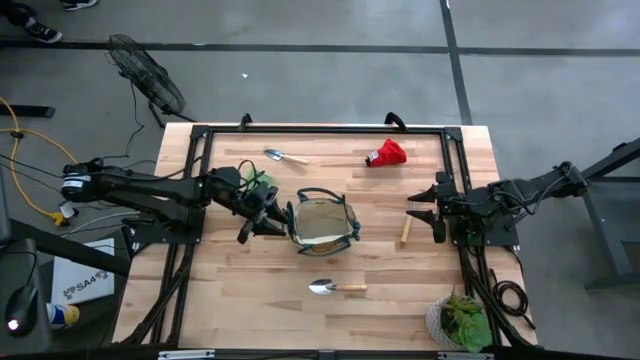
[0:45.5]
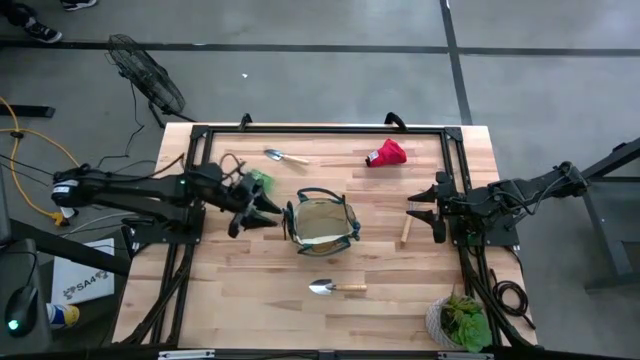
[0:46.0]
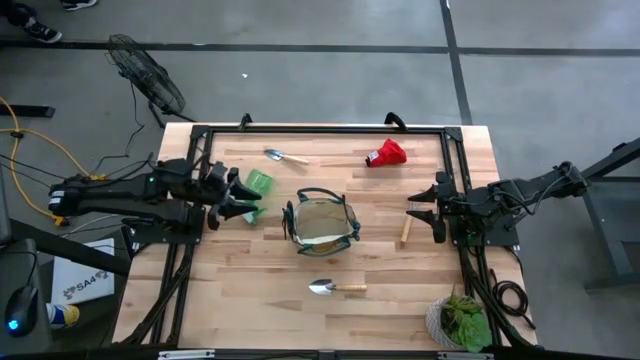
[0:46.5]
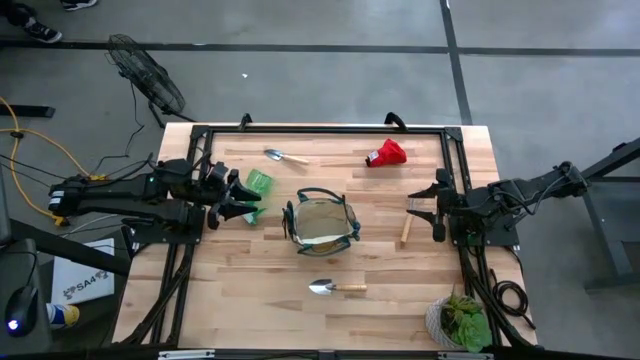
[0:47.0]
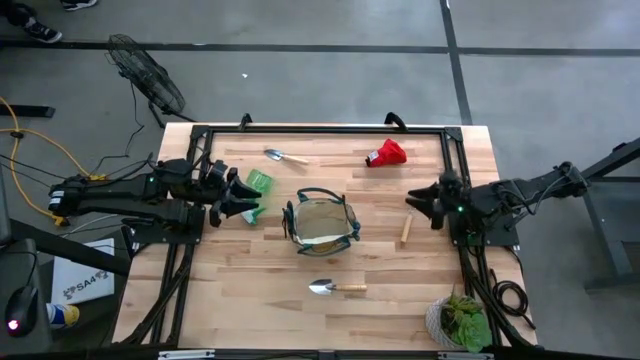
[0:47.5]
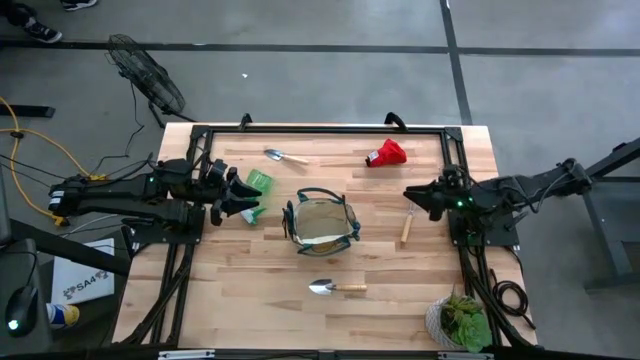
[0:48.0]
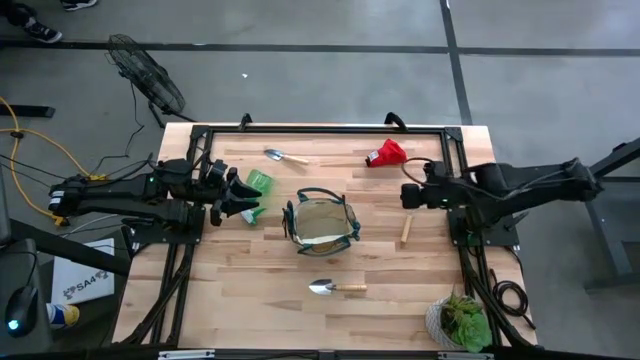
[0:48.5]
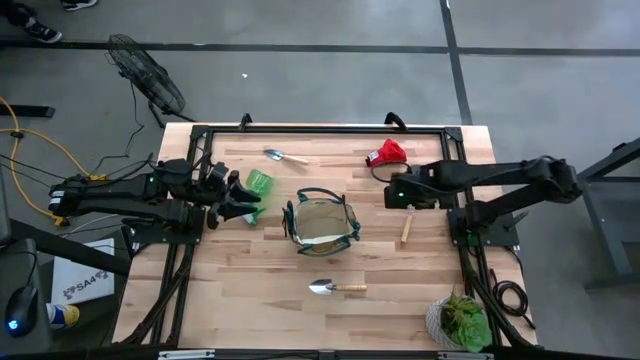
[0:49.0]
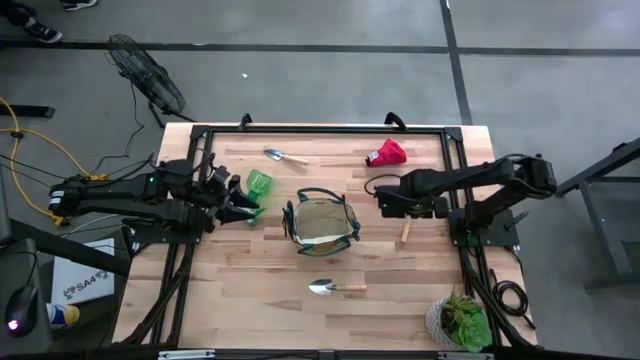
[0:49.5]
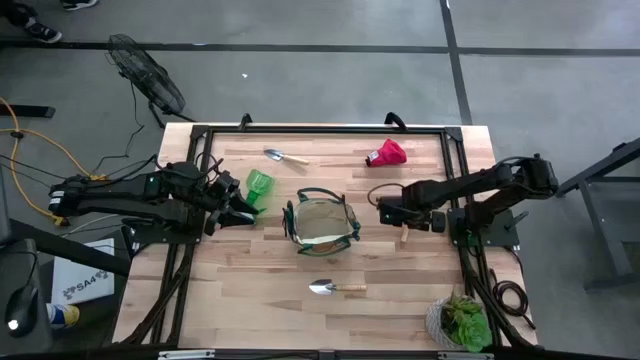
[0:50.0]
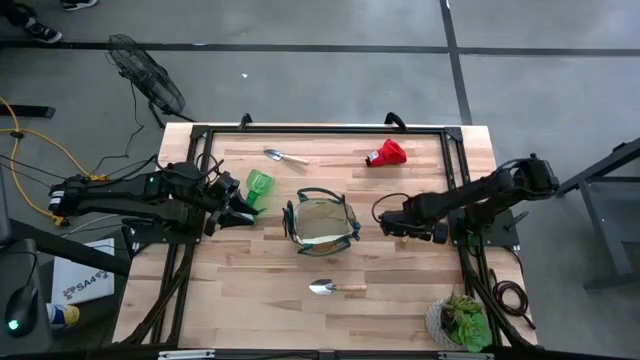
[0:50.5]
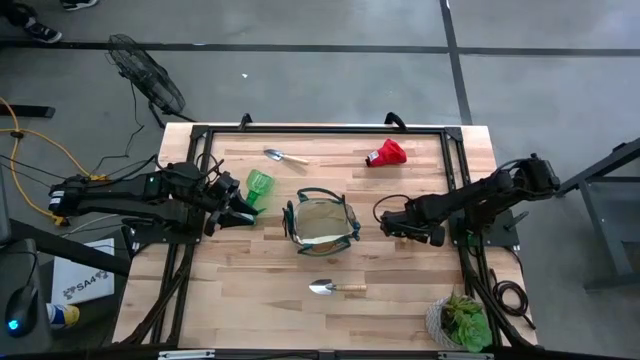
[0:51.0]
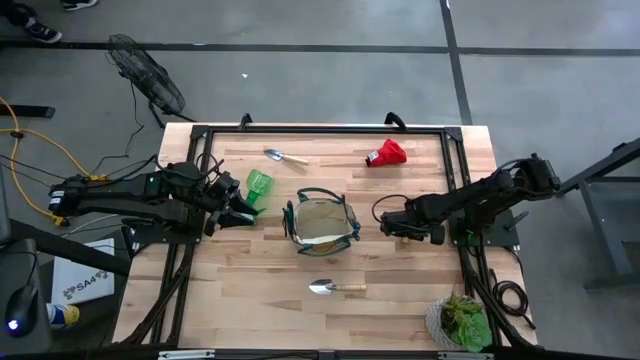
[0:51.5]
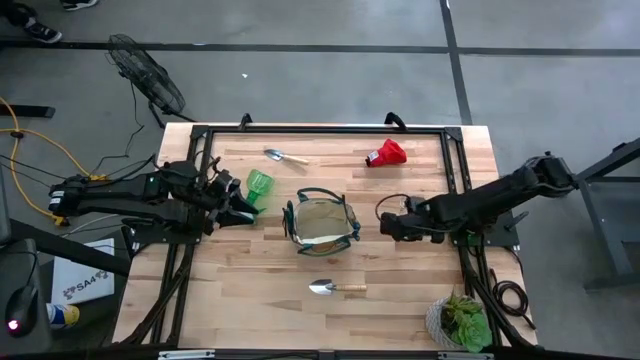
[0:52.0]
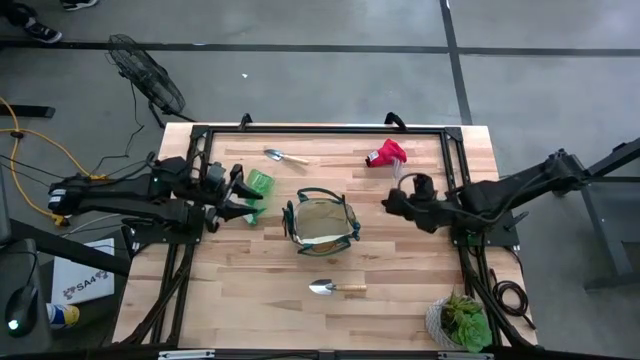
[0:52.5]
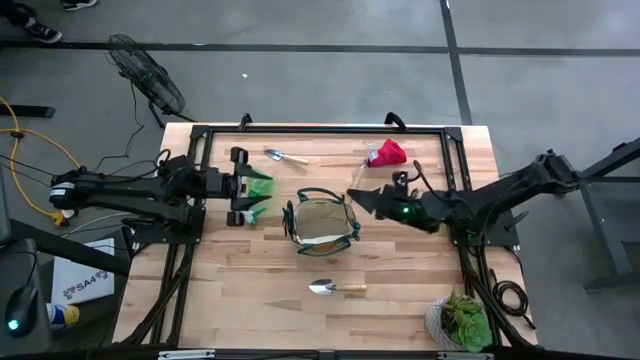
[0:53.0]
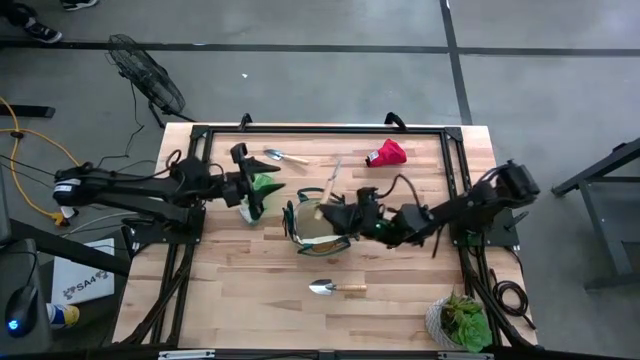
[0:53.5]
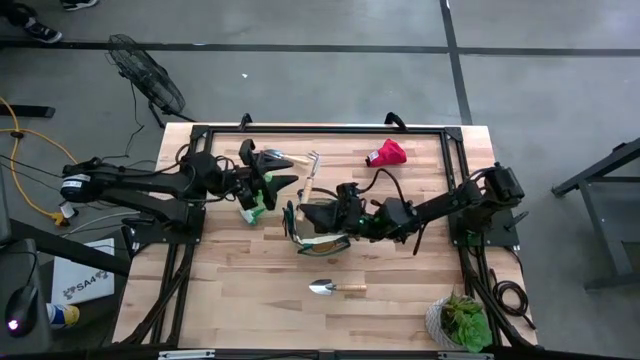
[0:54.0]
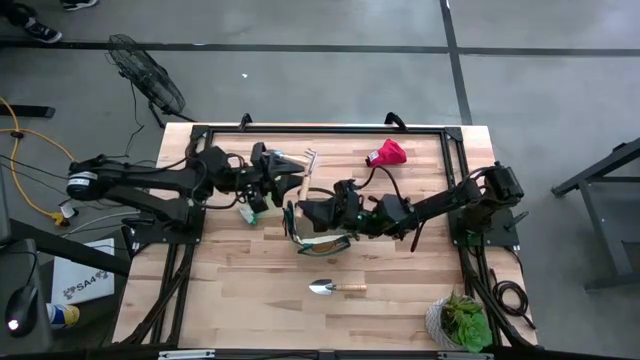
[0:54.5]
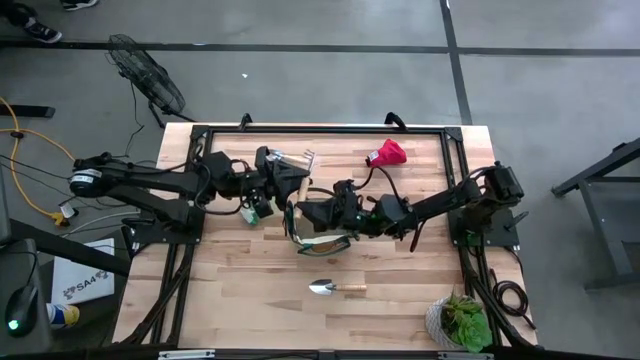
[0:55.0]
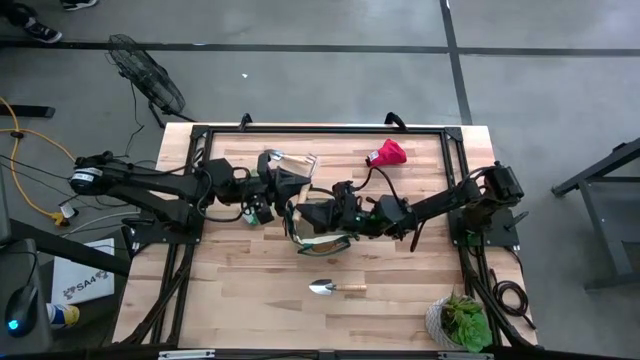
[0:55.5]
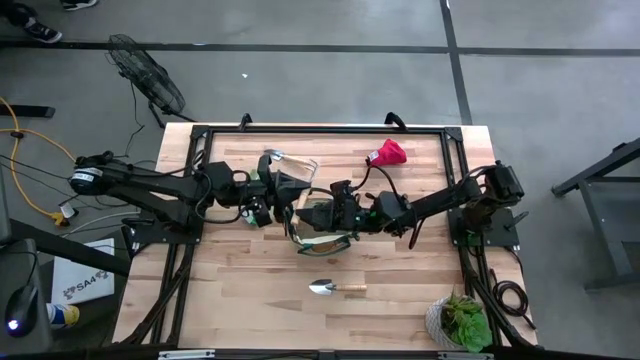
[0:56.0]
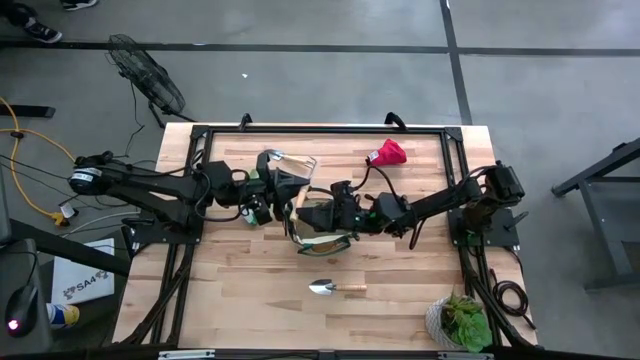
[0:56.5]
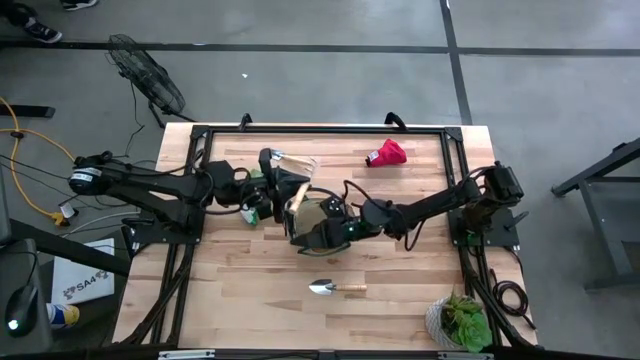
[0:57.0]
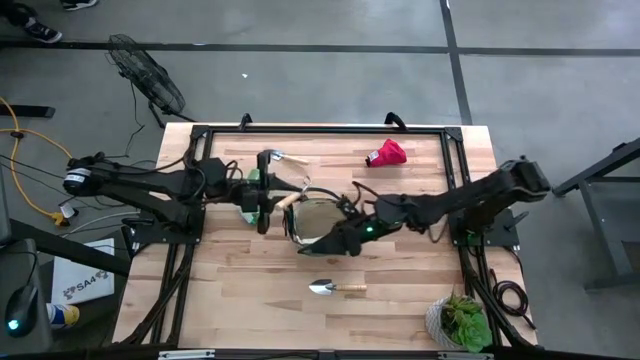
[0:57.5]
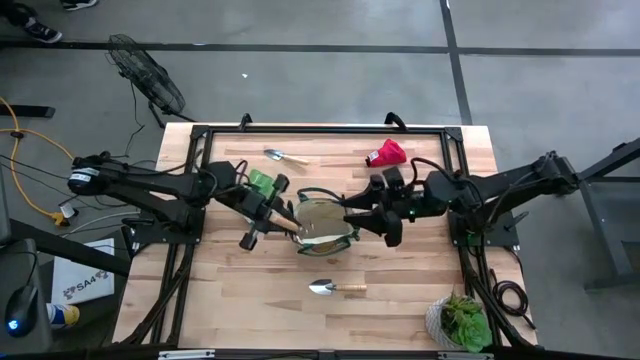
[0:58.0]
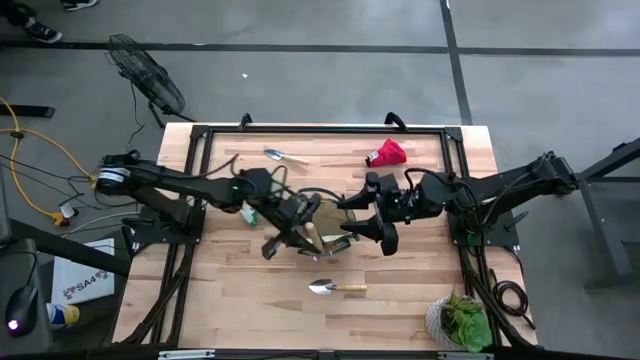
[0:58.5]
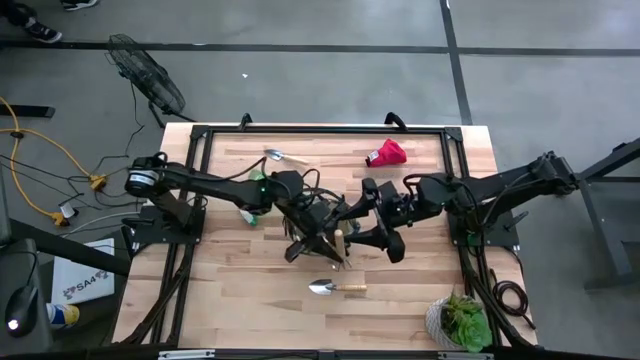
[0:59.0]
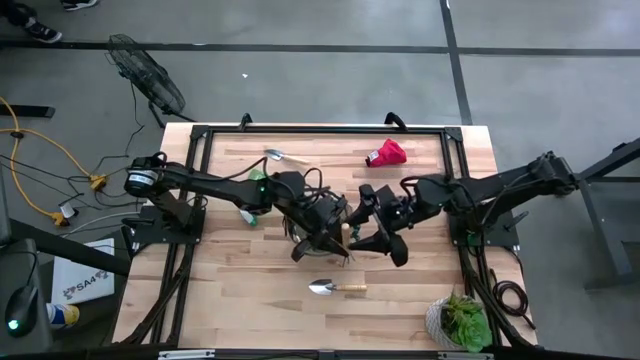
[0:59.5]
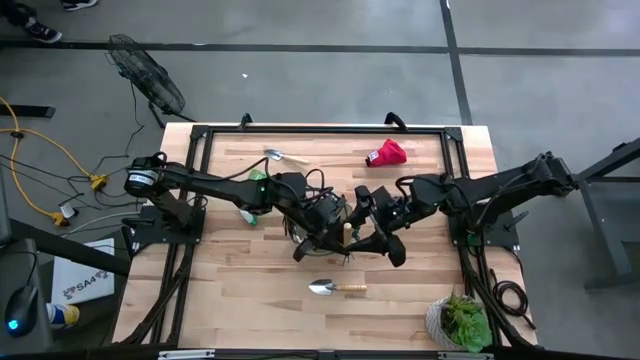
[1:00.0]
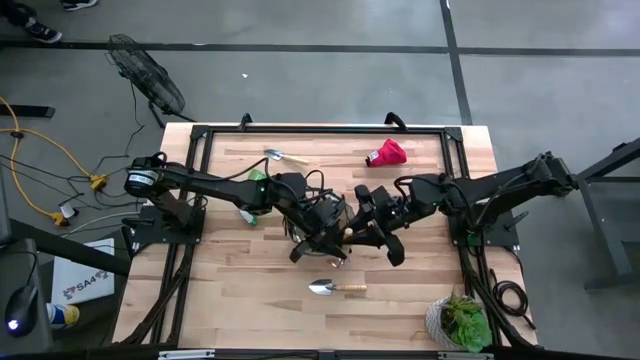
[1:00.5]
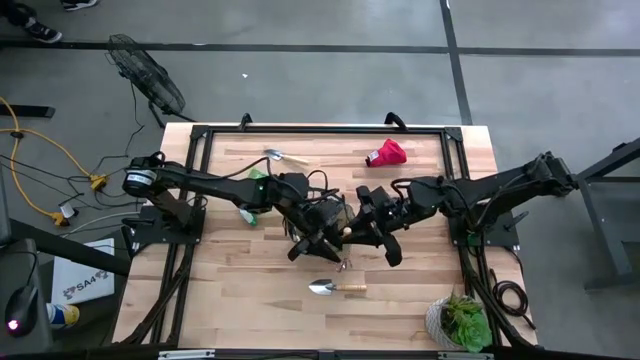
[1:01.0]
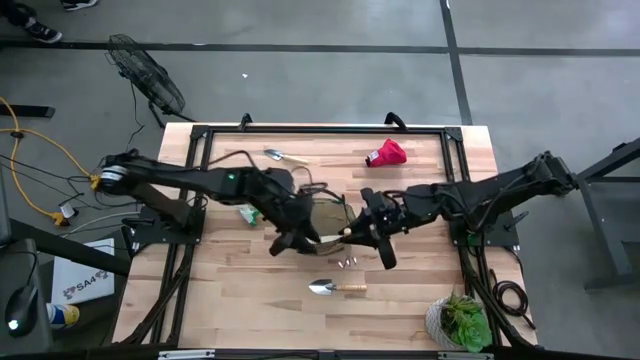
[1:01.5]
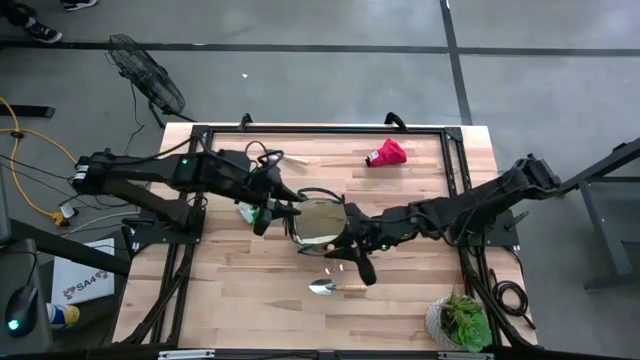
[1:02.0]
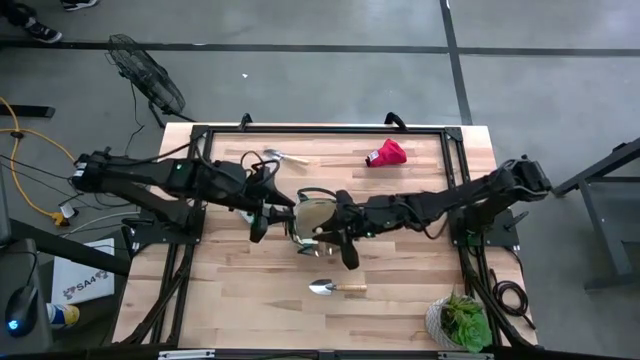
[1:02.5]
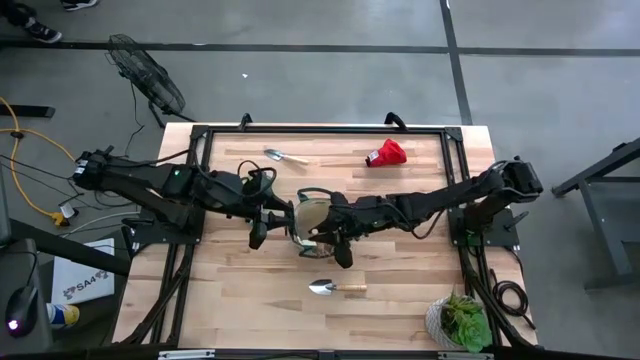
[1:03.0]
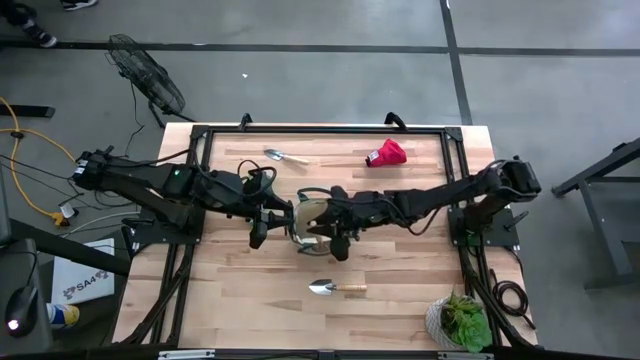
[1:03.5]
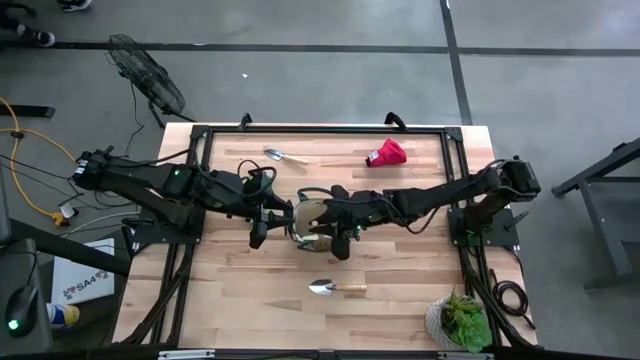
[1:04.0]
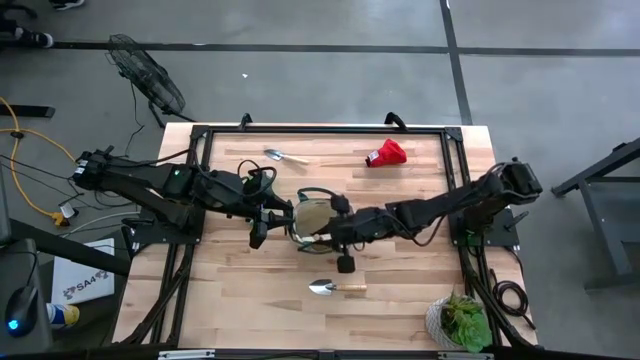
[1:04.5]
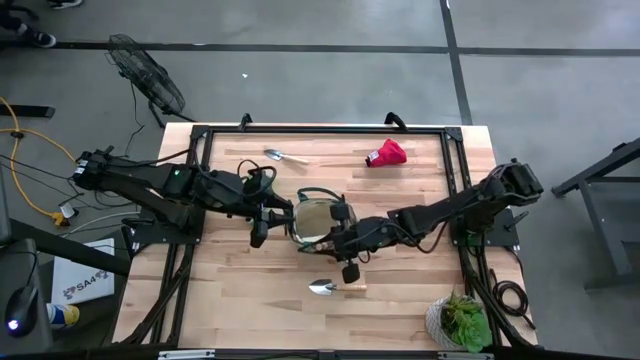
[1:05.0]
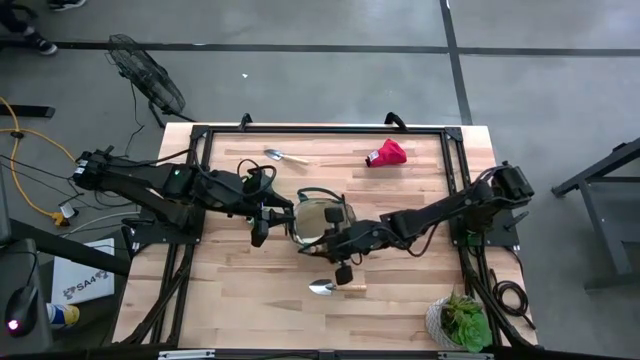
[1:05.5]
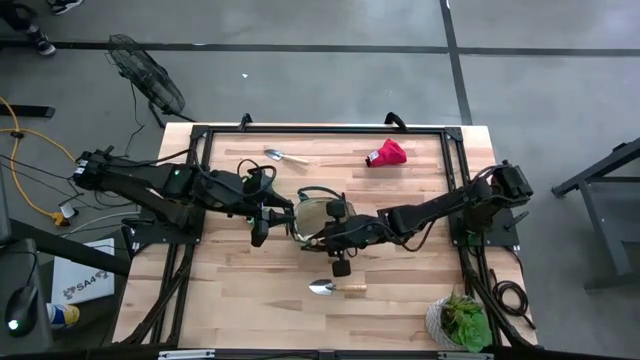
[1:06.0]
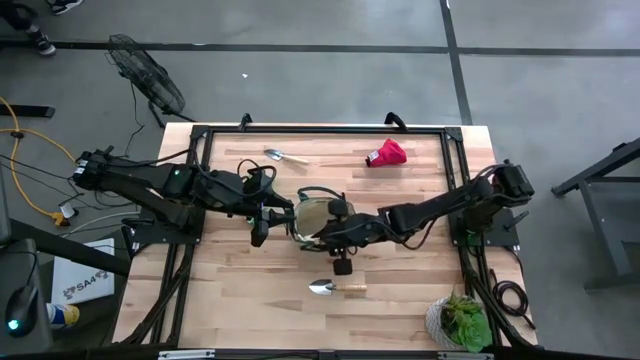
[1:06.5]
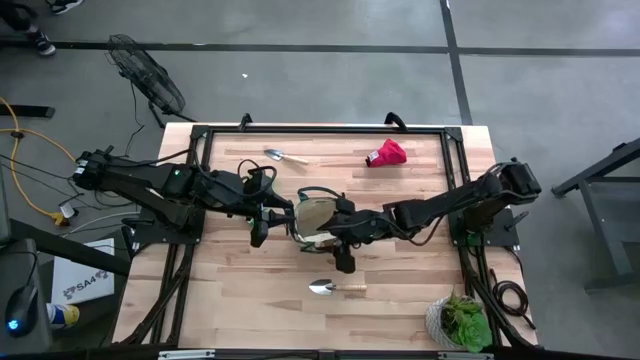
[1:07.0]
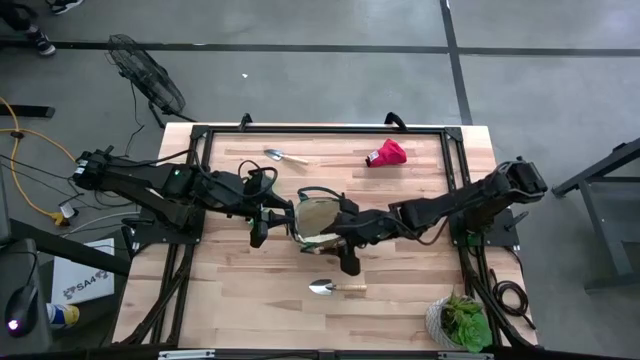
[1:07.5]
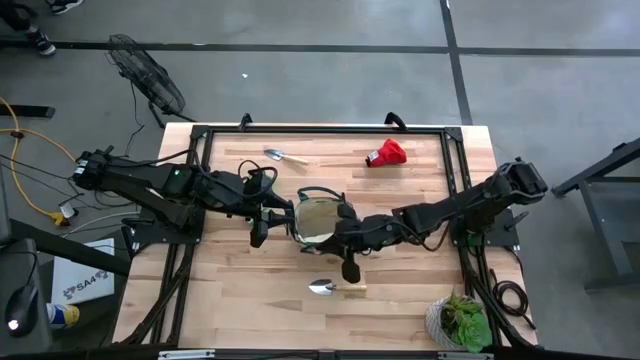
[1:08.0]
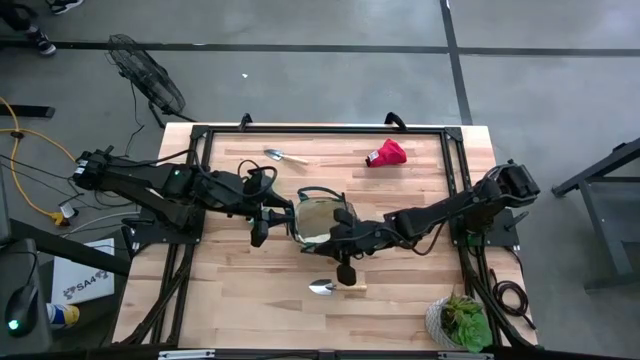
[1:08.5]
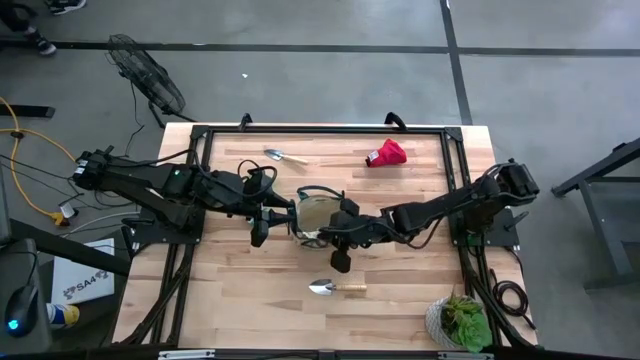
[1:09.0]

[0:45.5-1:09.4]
Task: Pick & Place Garden tools in Gardening bag
Put the brown hand rake into the gardening bag
